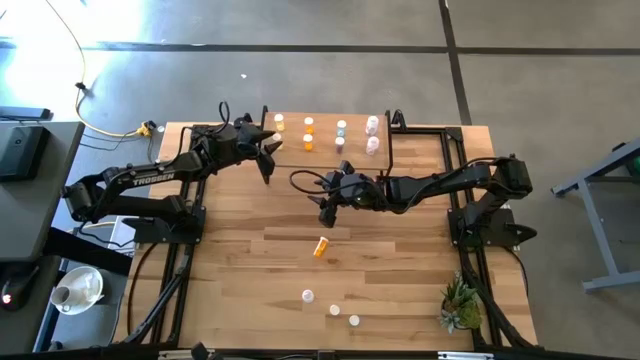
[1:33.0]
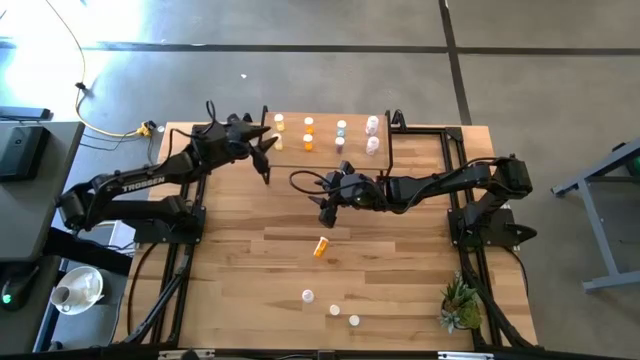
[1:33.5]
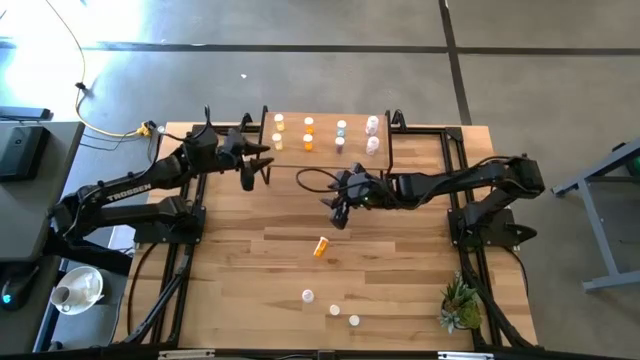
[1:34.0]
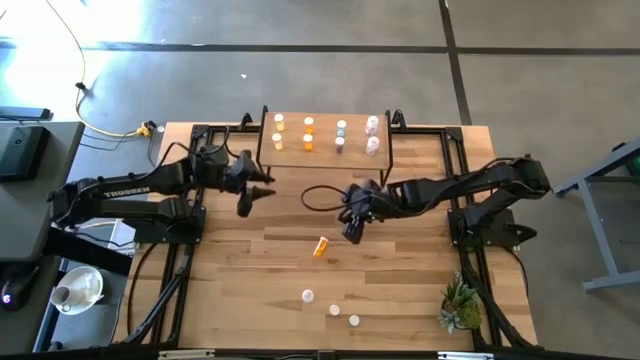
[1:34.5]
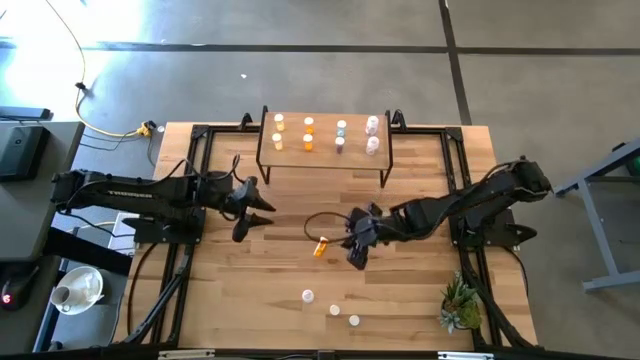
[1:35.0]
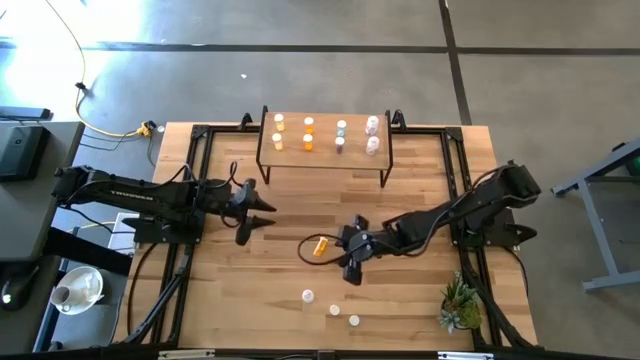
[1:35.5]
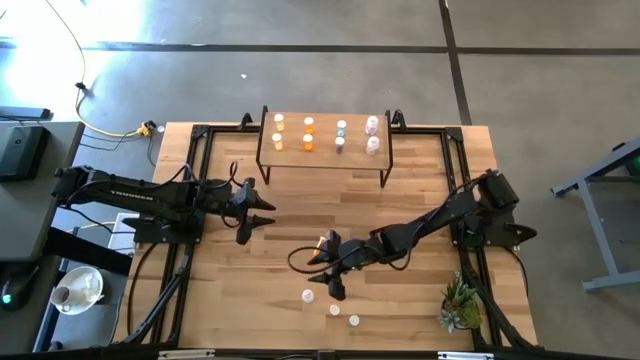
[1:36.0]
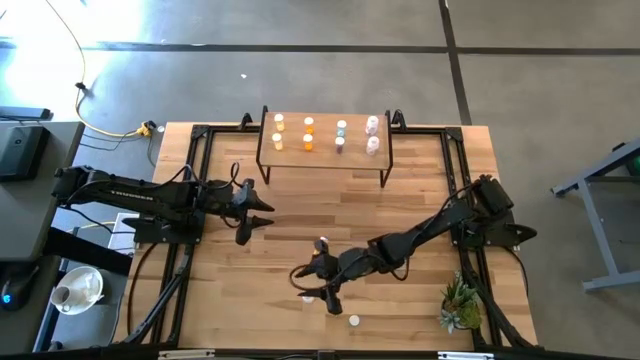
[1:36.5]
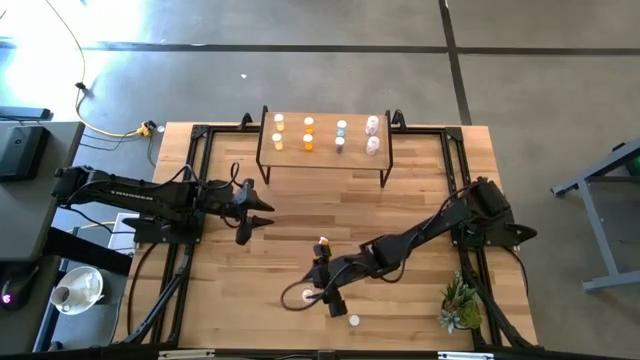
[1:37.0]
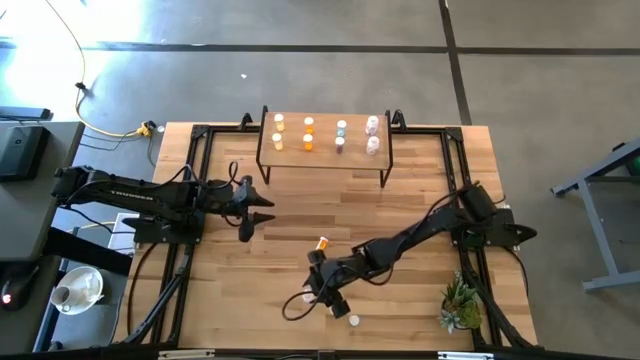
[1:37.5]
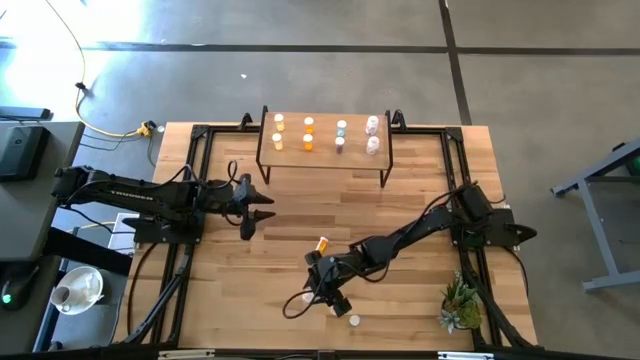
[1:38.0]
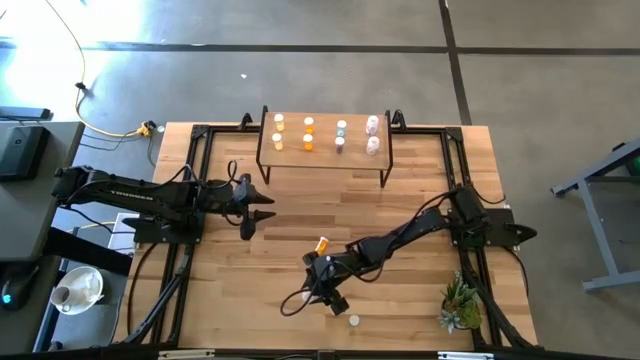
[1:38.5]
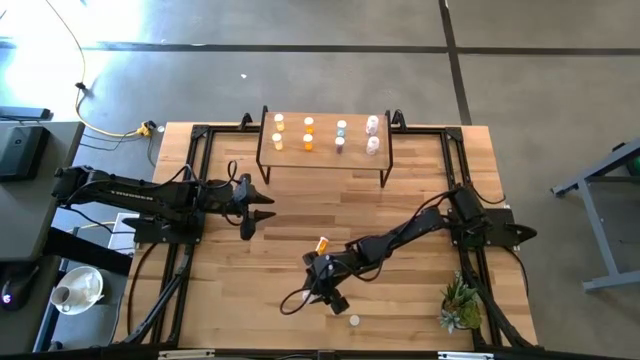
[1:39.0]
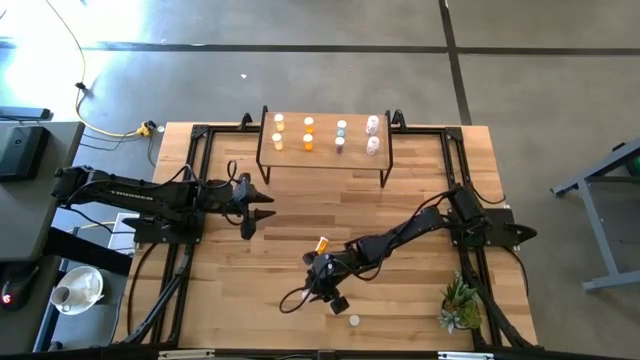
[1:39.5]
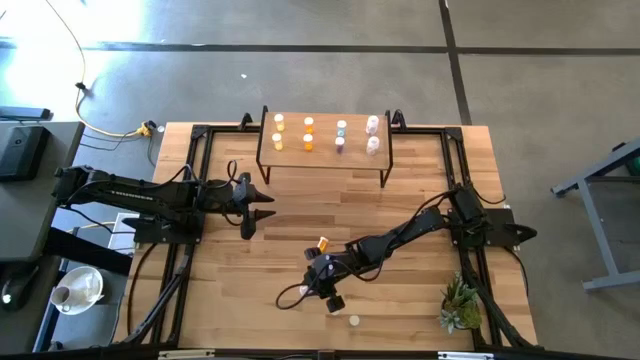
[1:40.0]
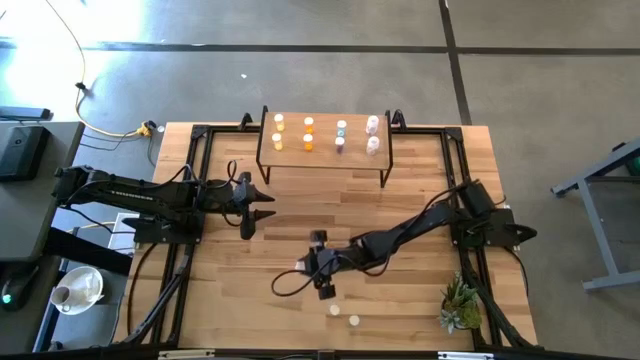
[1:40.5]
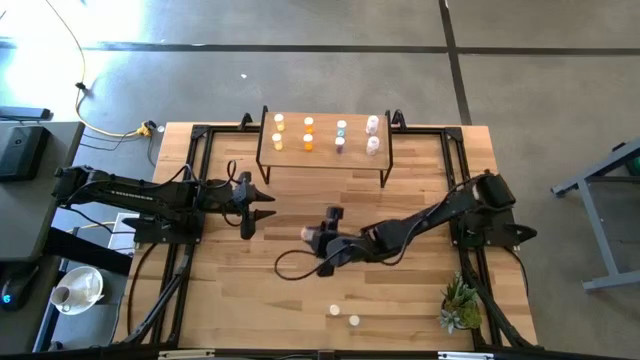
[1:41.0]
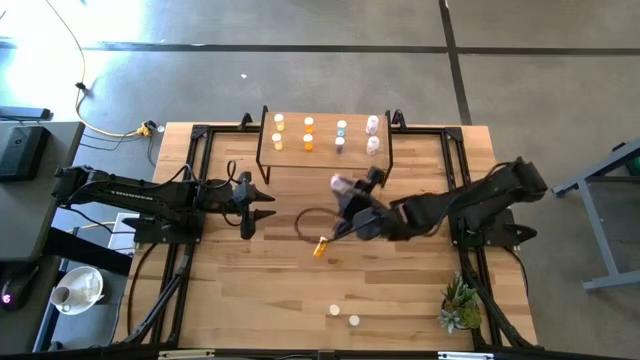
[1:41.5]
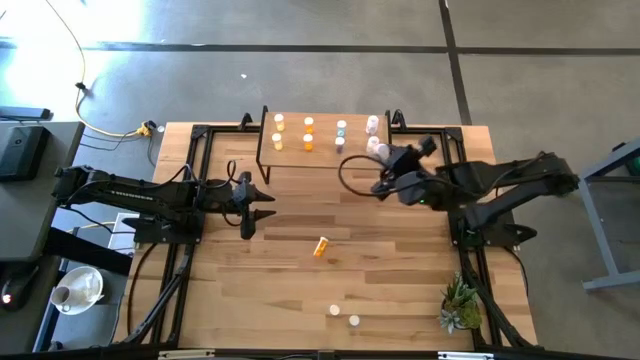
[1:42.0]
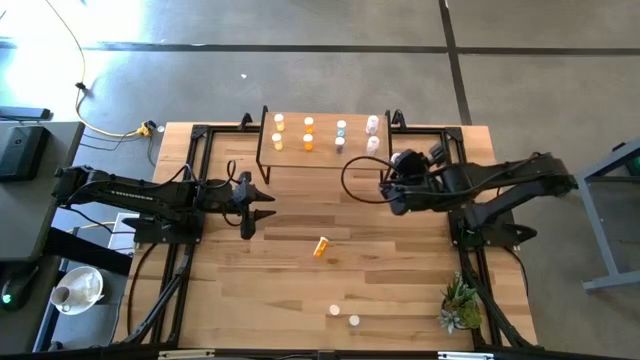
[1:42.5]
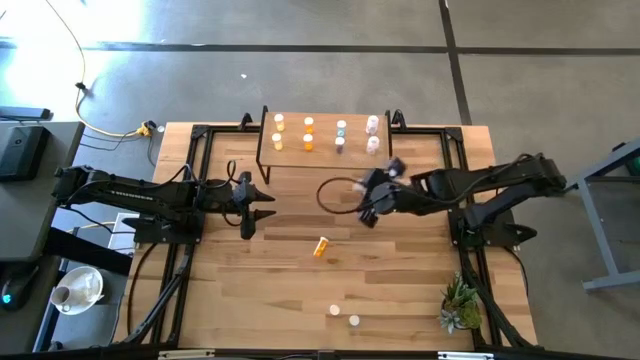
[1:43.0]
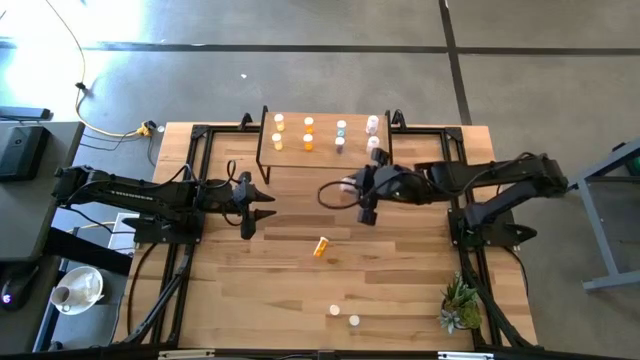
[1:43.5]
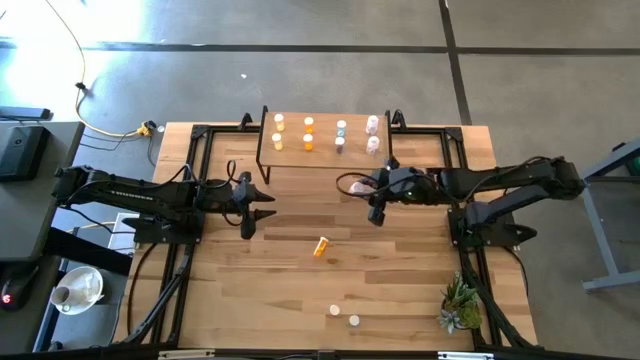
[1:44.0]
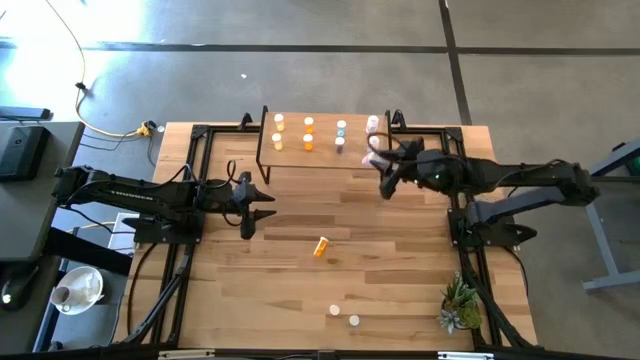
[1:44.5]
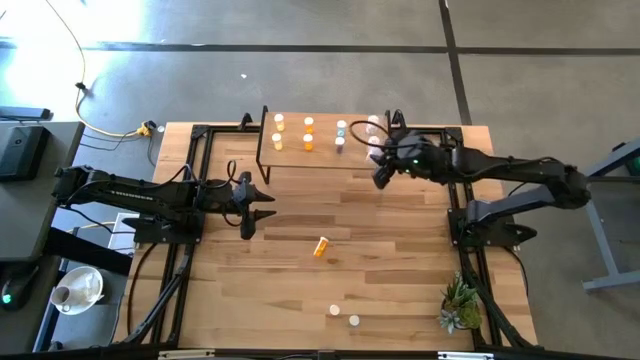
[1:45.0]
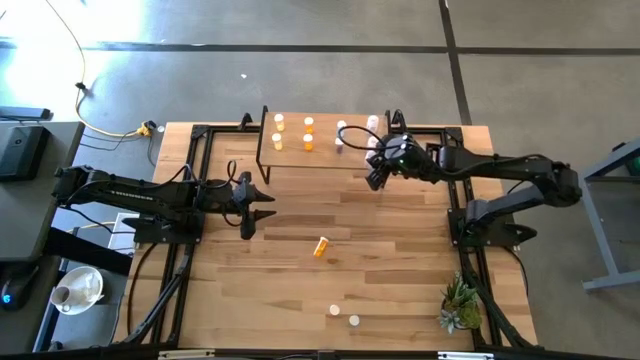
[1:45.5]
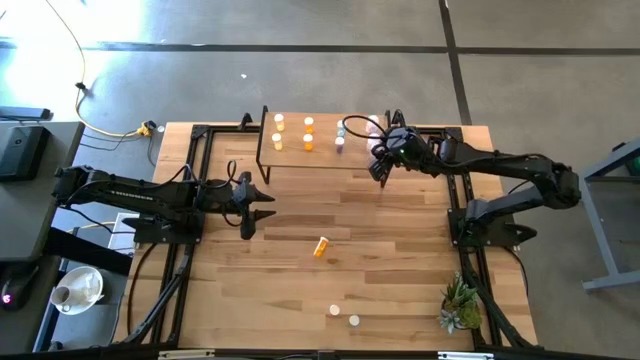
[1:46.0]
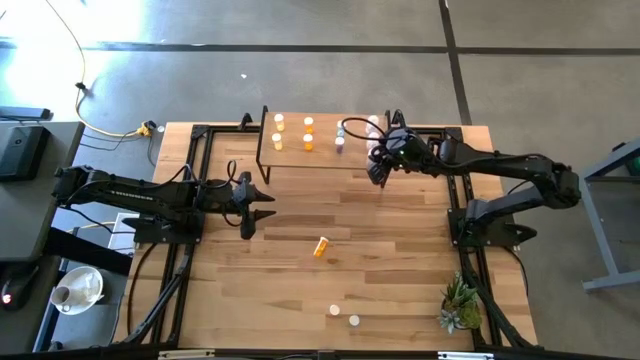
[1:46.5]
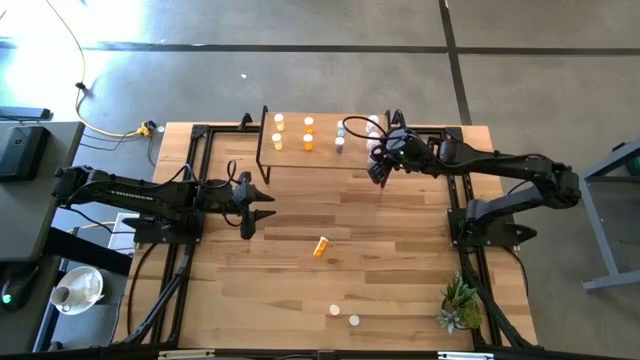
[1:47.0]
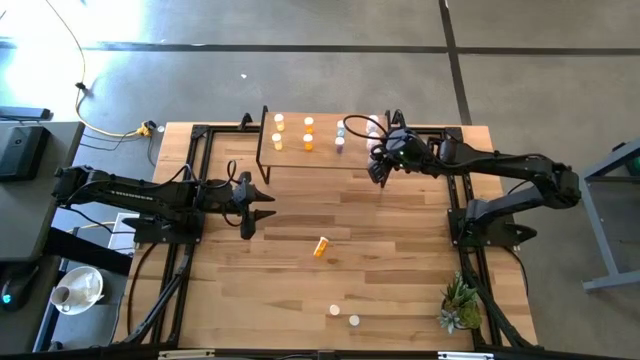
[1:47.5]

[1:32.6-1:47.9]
Task: Pick and place medicine bottles onto shelf by color
Put the transparent pill bottle on the shelf aligned with the transparent pill bottles

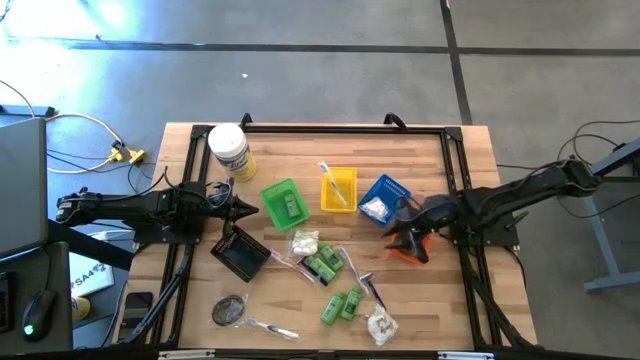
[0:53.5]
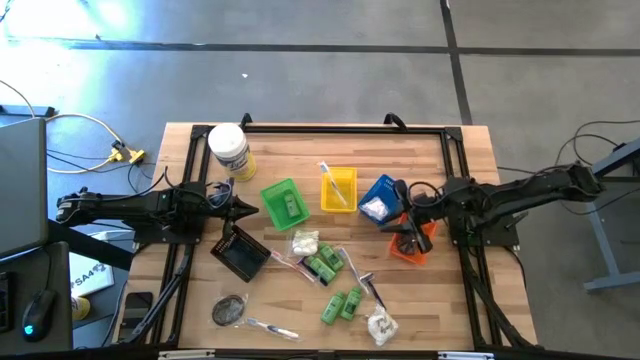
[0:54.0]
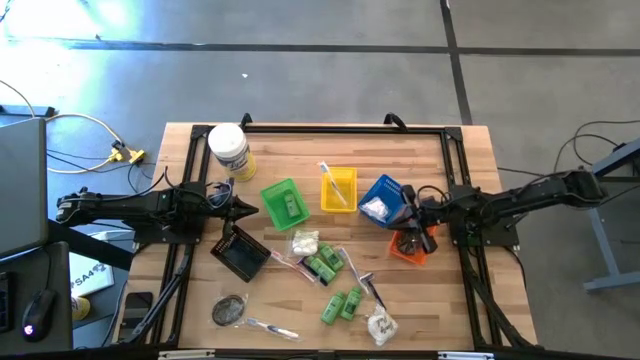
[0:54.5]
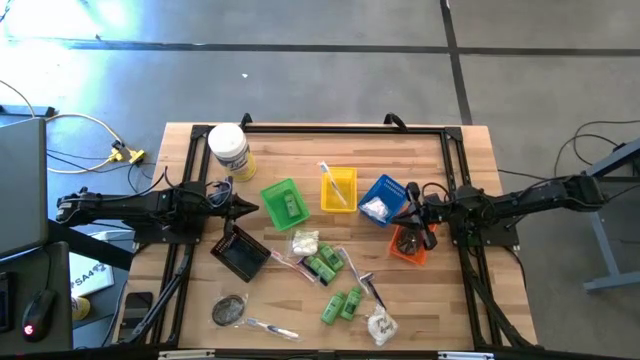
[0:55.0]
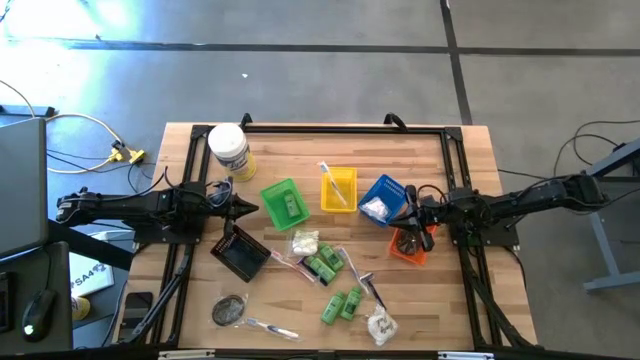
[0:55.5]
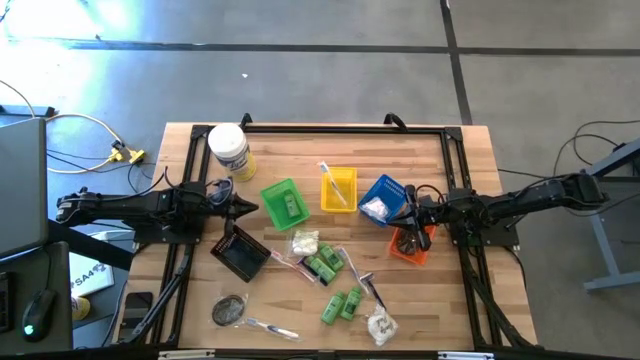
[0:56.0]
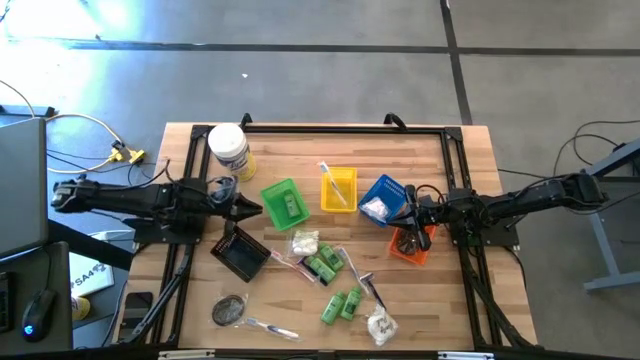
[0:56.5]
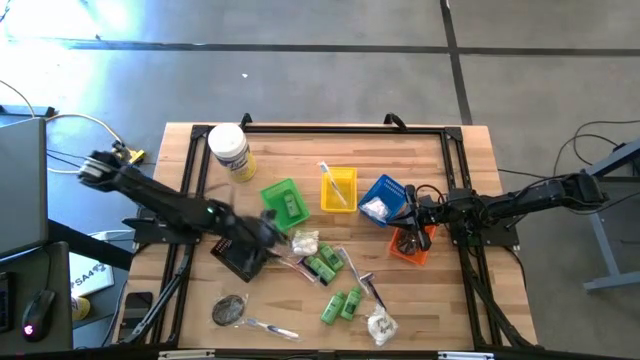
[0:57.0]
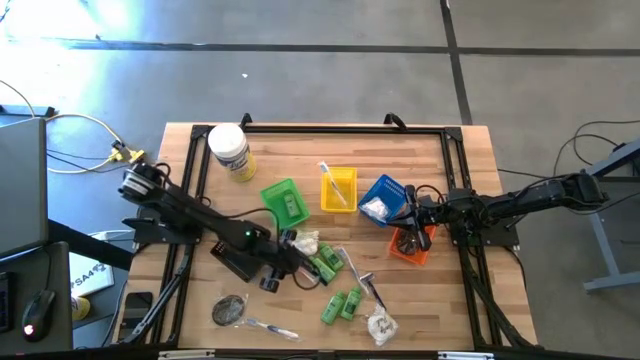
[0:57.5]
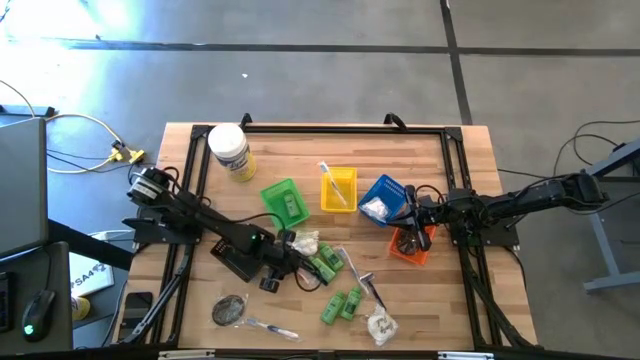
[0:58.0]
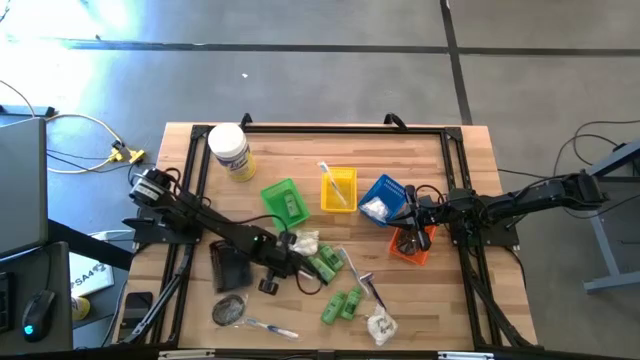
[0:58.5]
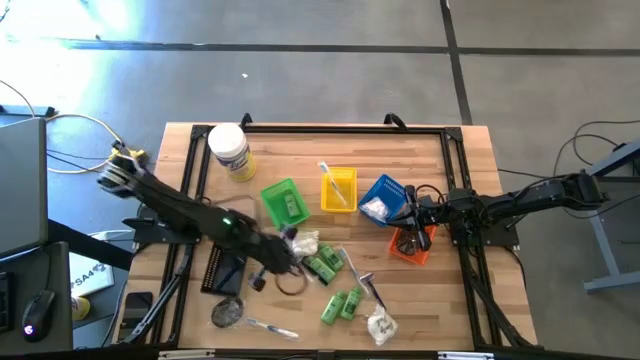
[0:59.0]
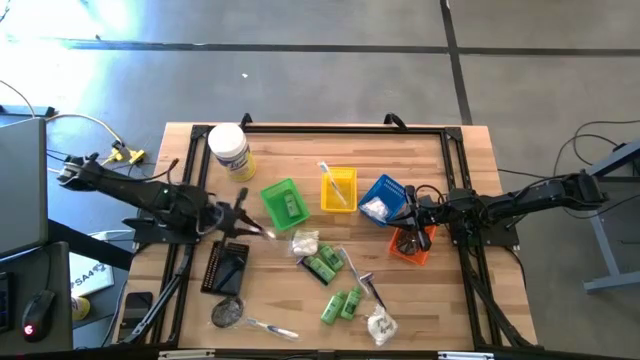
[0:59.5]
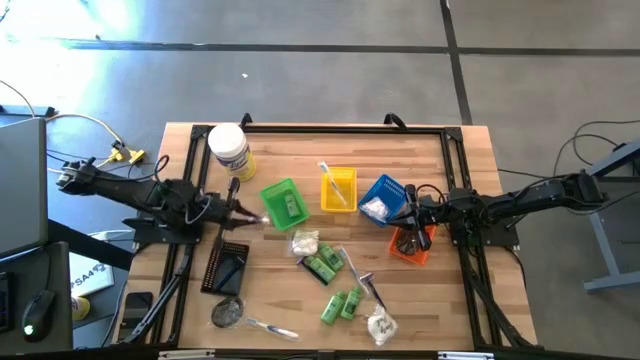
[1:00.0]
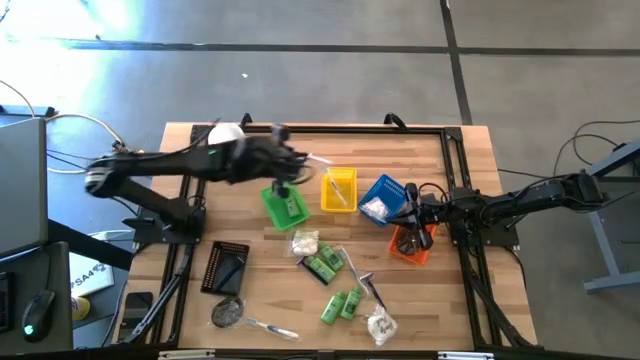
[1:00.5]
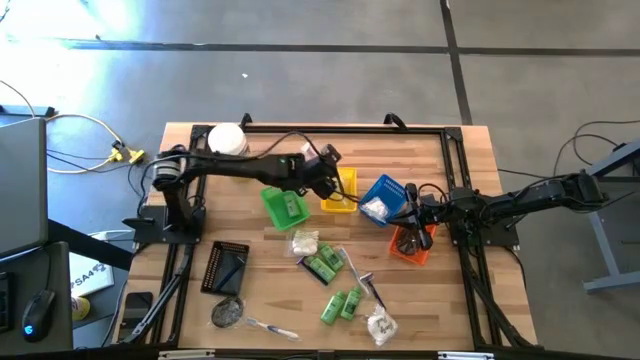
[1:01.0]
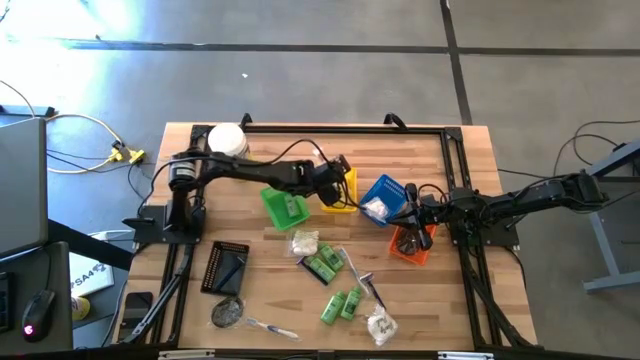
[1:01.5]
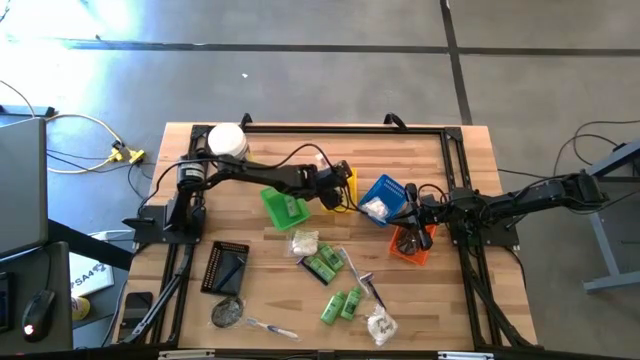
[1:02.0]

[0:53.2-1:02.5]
Task: Pick & Place Travel size toiletries
Put the orange toothbrush into the yellow bin
